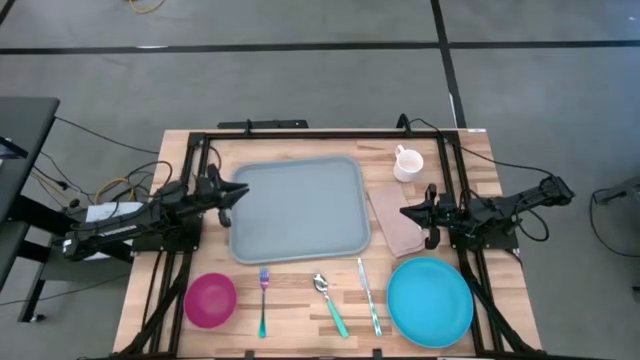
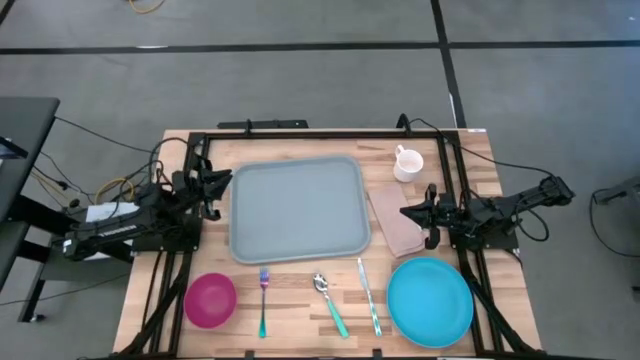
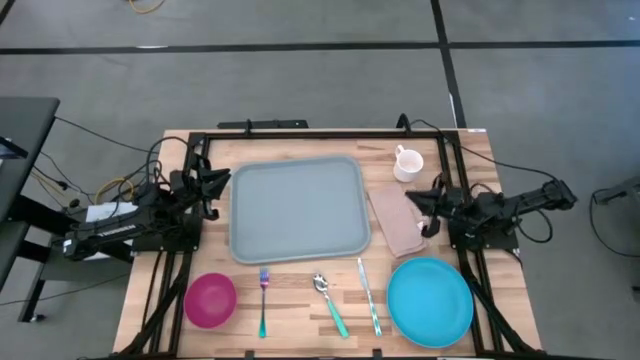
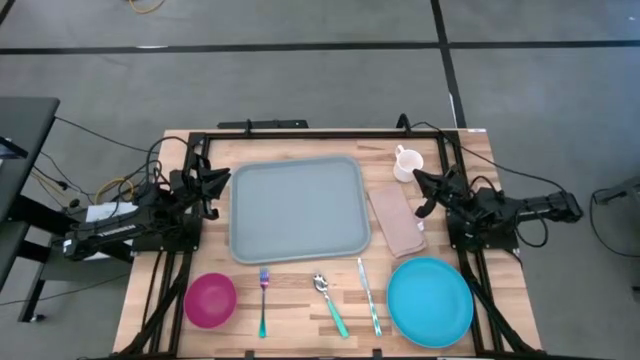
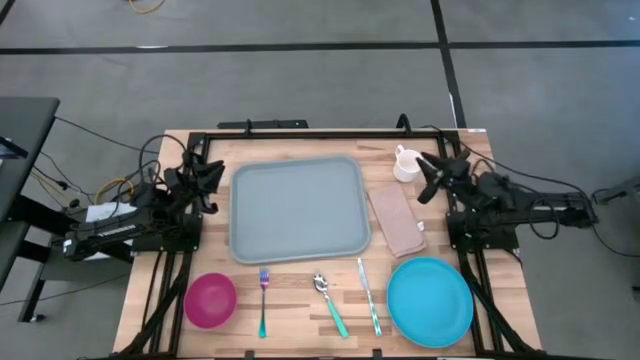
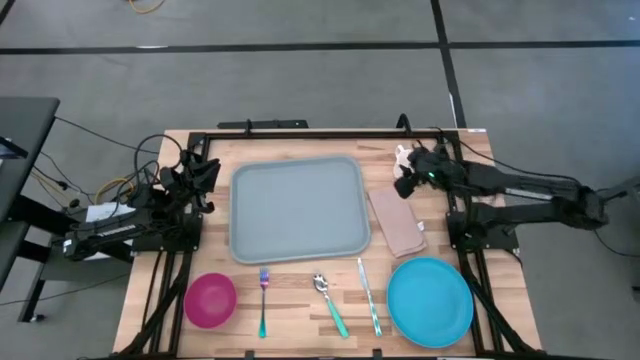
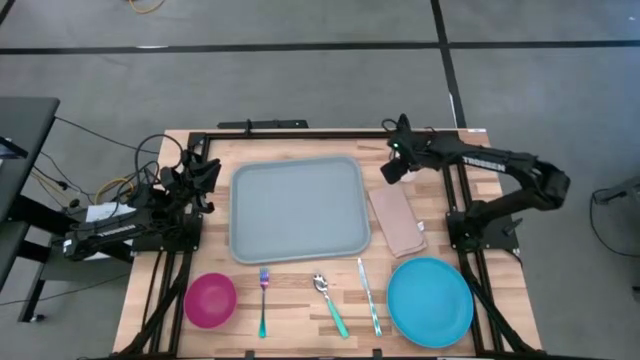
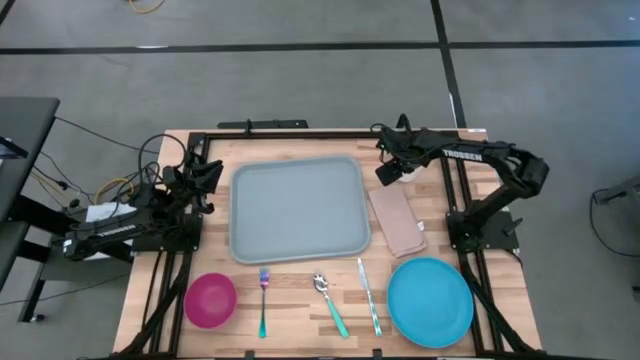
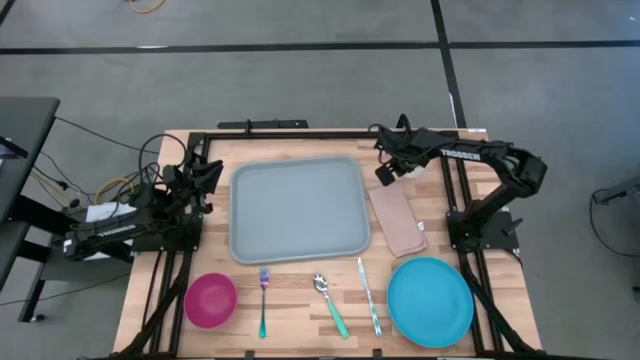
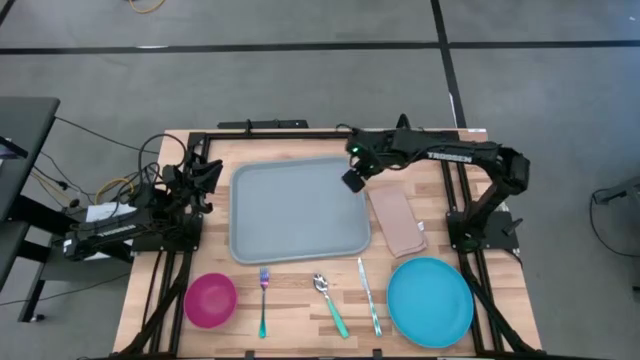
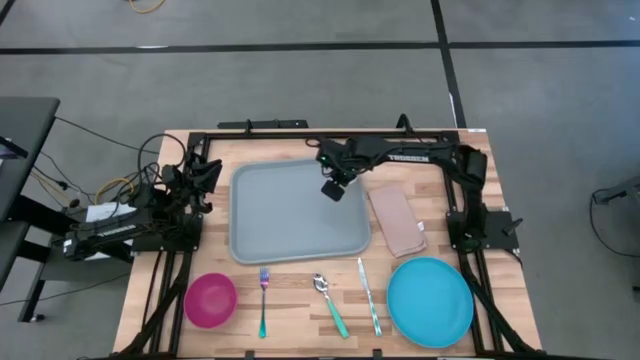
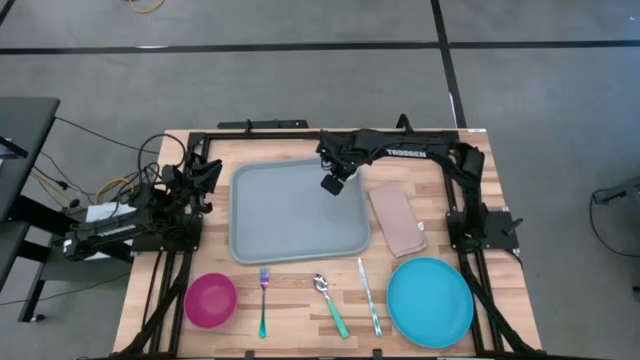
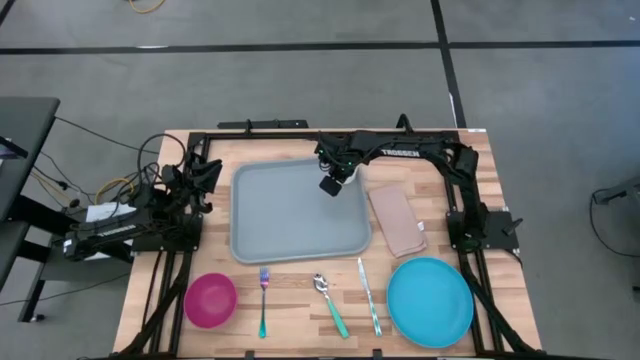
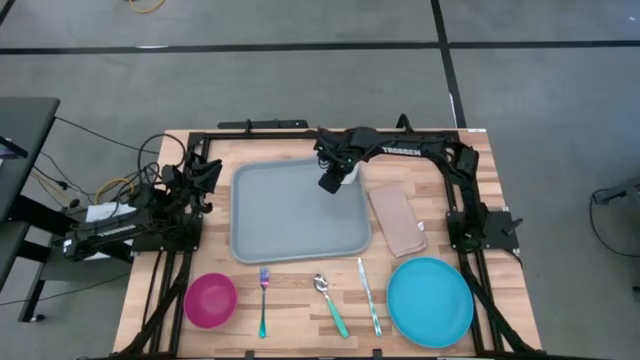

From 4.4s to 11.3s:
Task: Set up tray
Put the mug on the top right of the tray

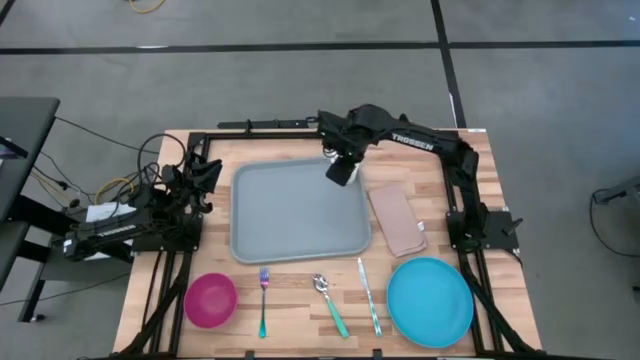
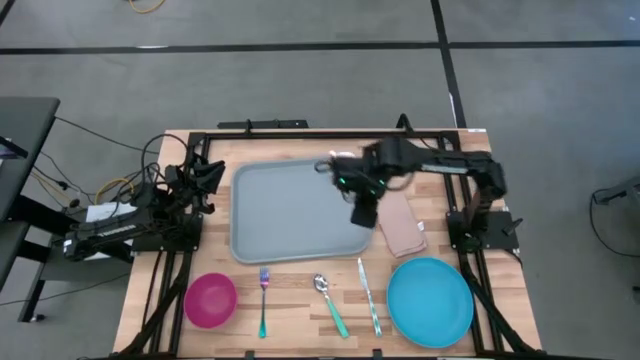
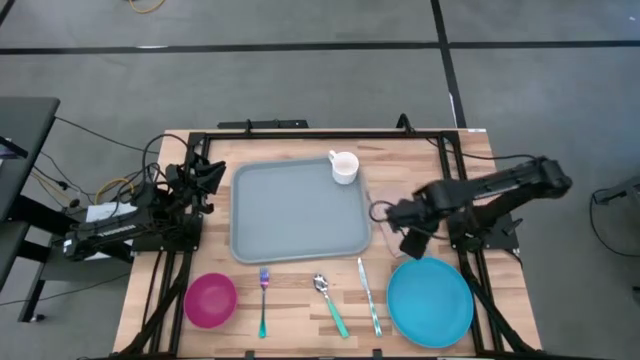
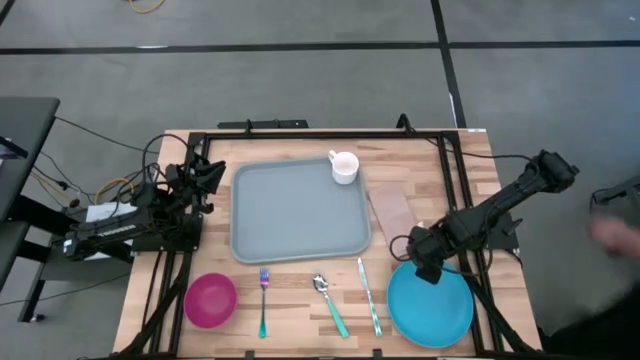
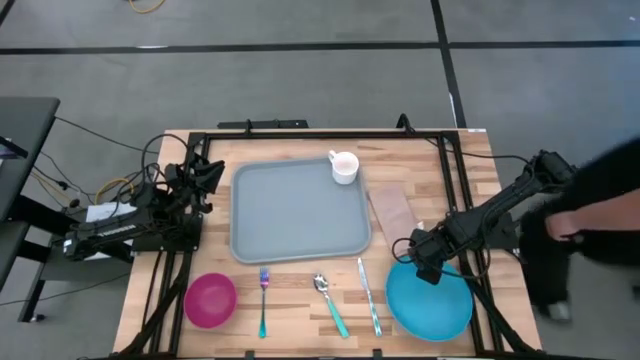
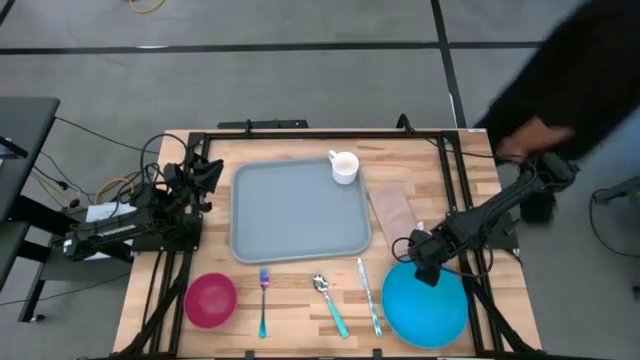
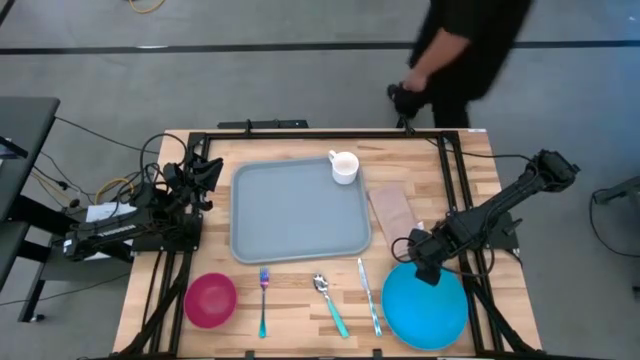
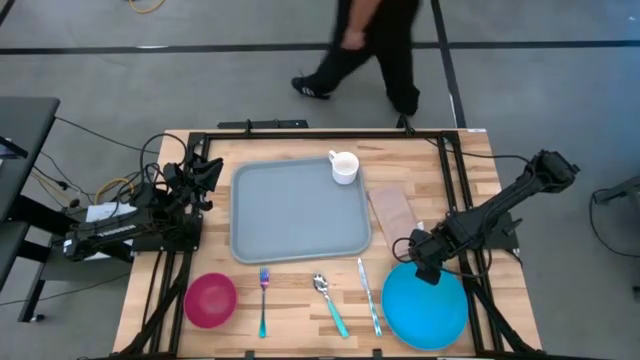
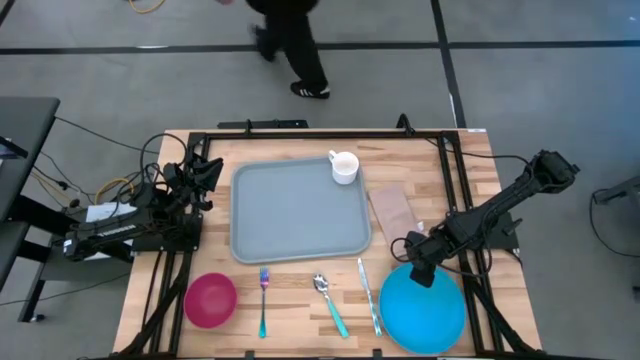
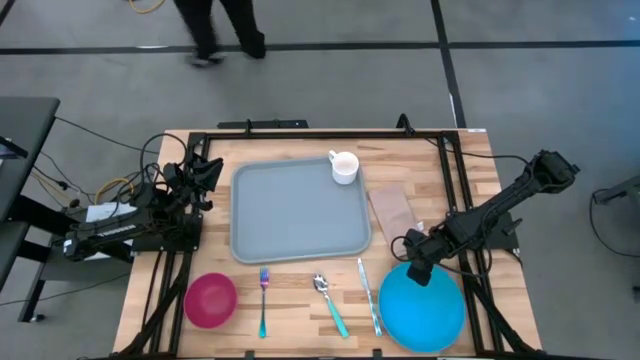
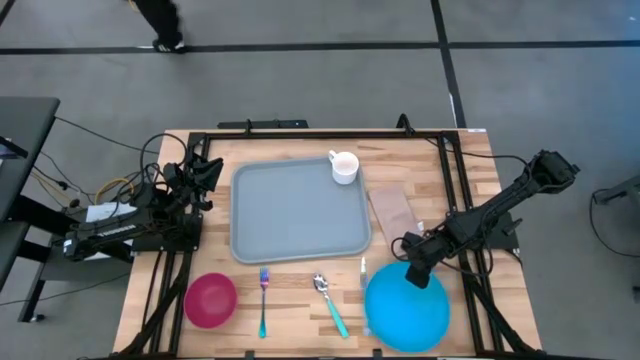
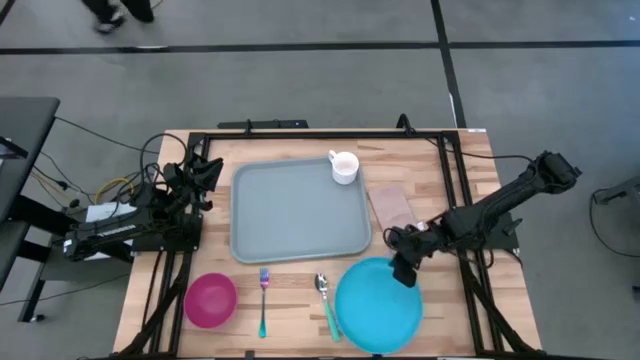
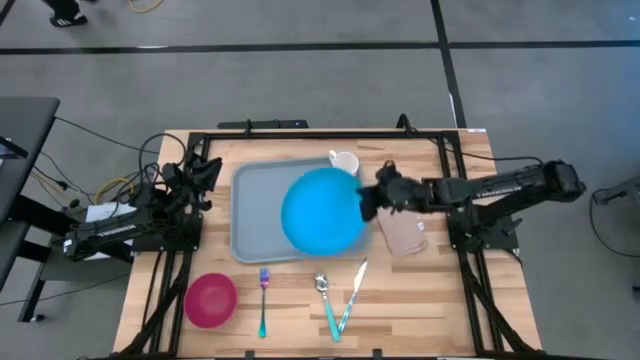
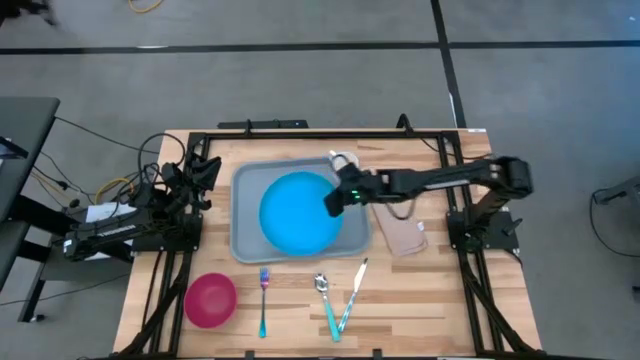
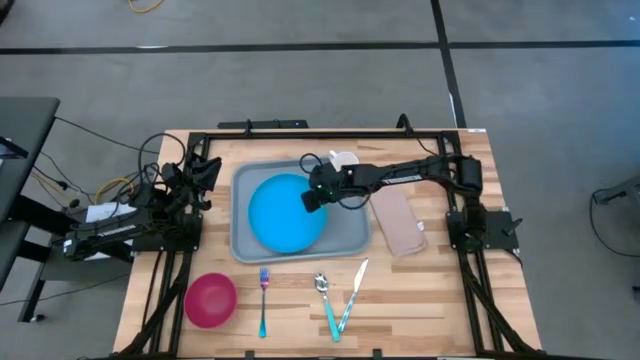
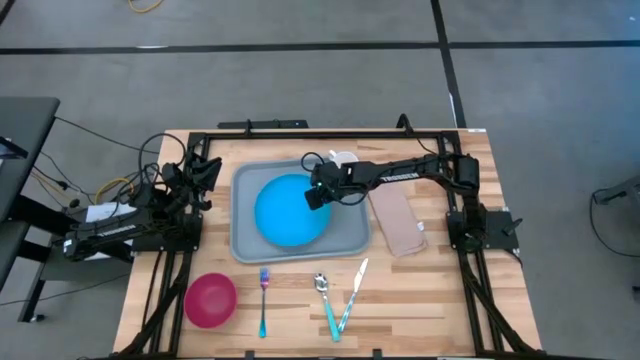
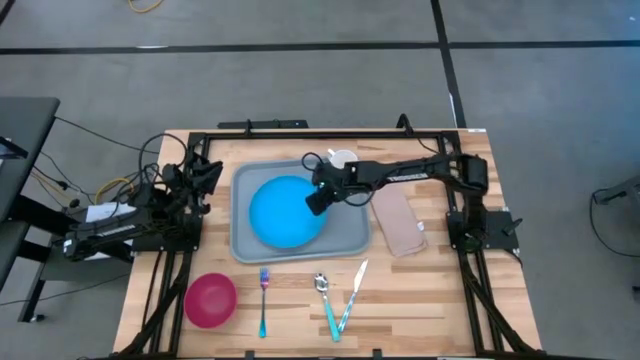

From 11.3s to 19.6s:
Put the blue plate on the center of the tray

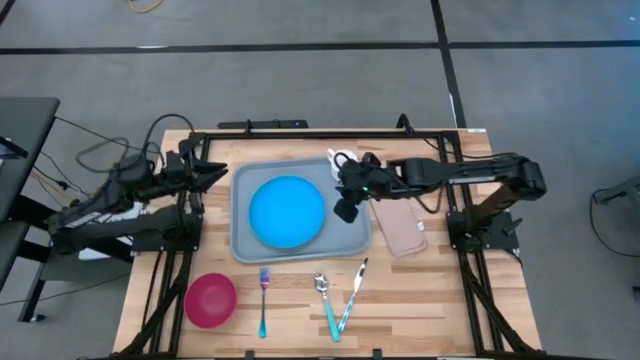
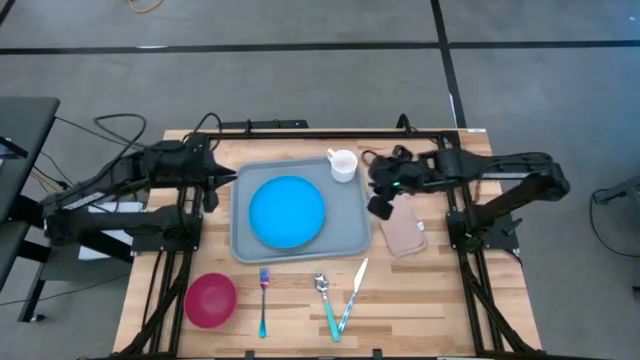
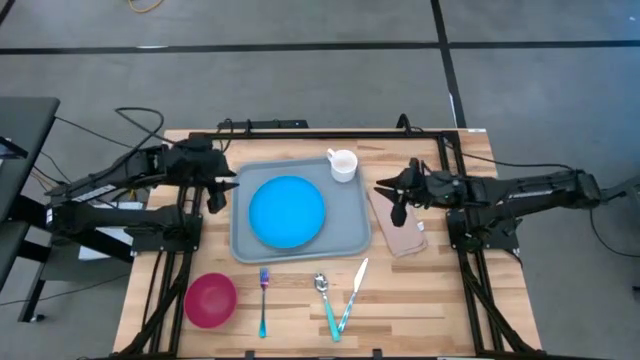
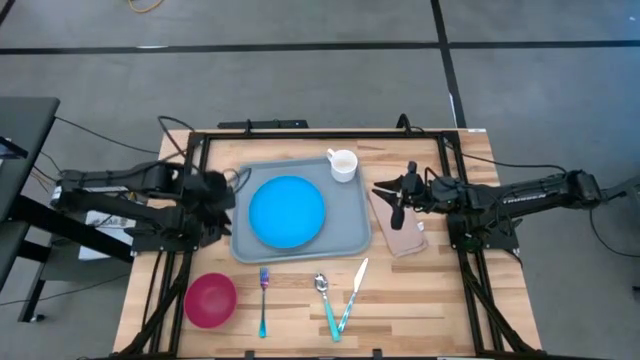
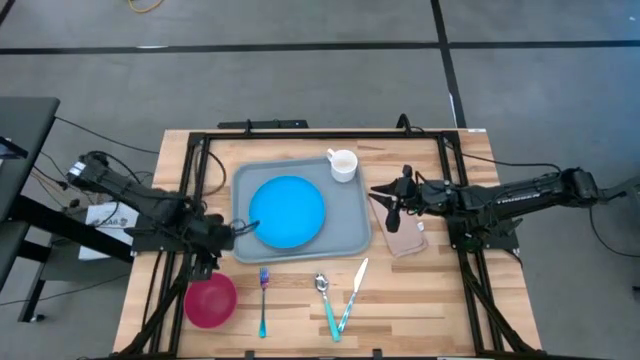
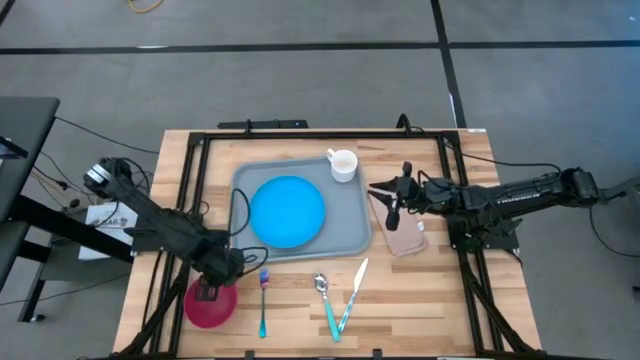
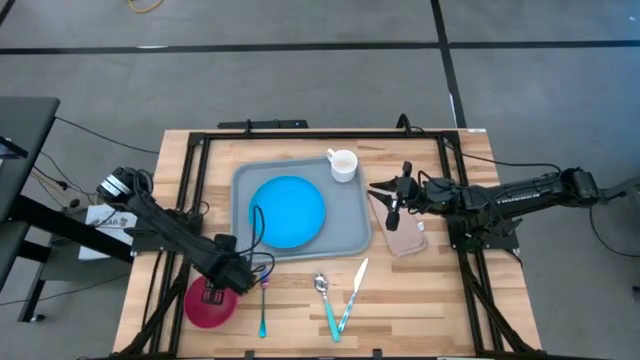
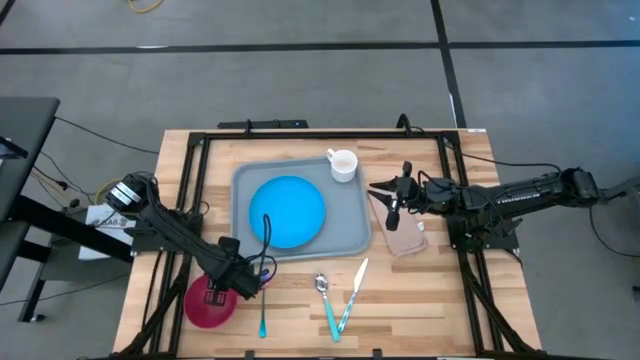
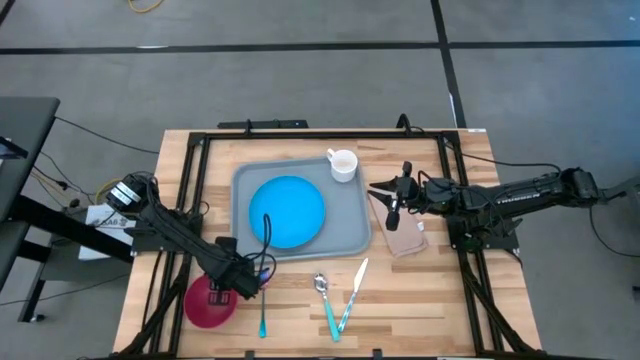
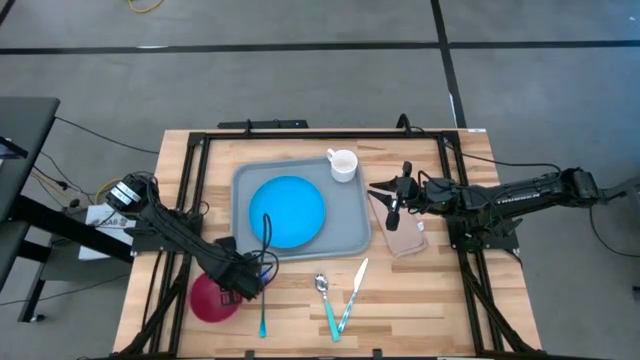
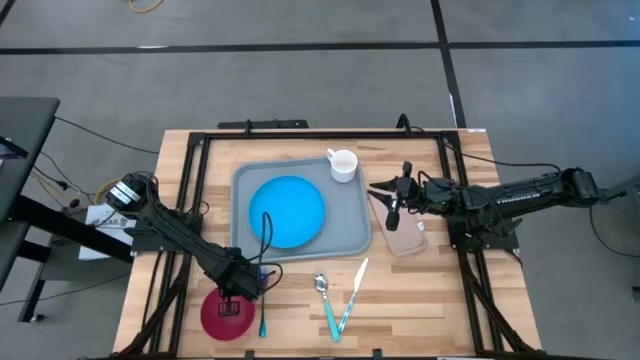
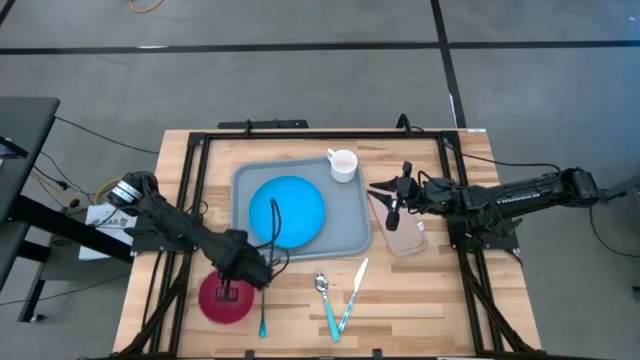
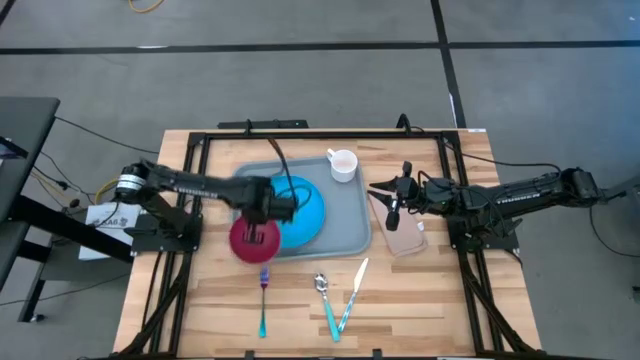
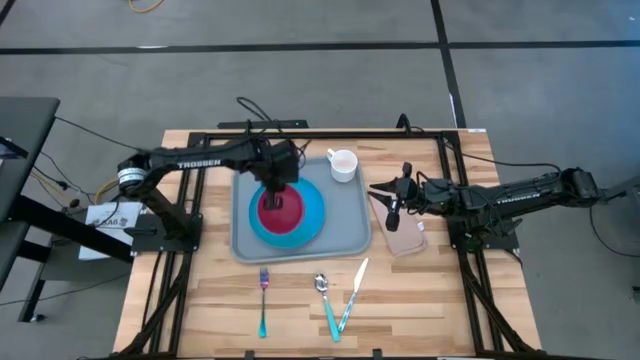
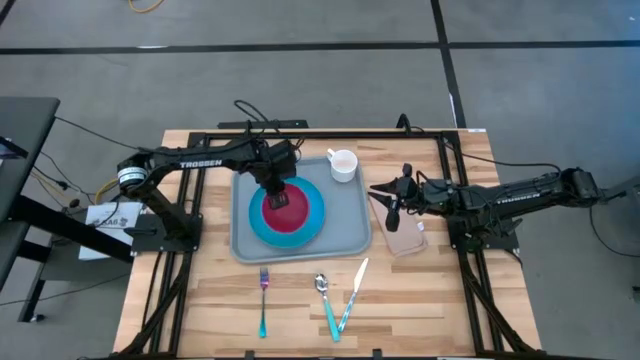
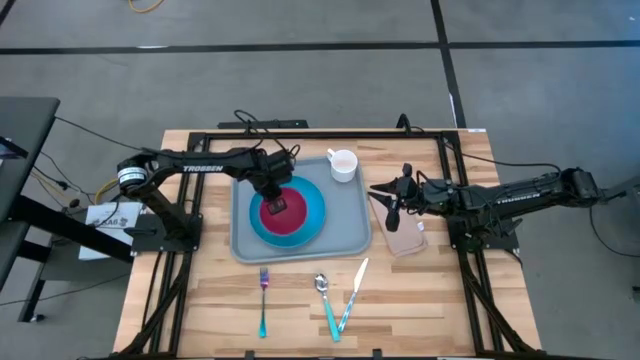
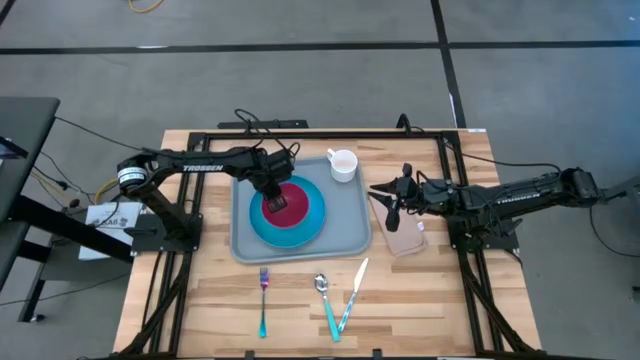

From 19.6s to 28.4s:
Put the red bowl on top of the blue plate on the tray
